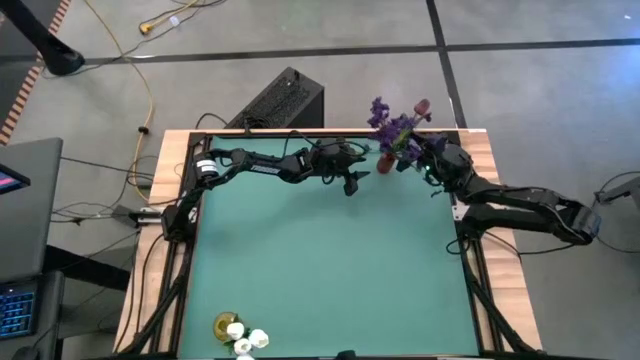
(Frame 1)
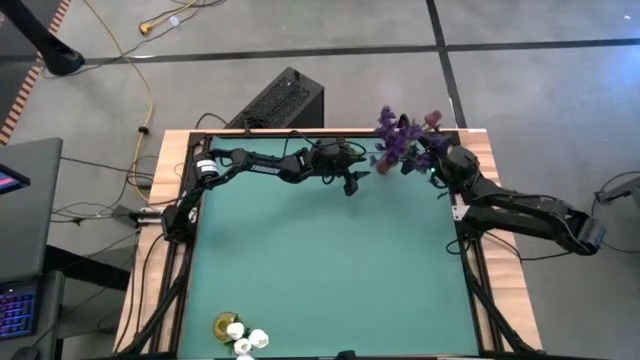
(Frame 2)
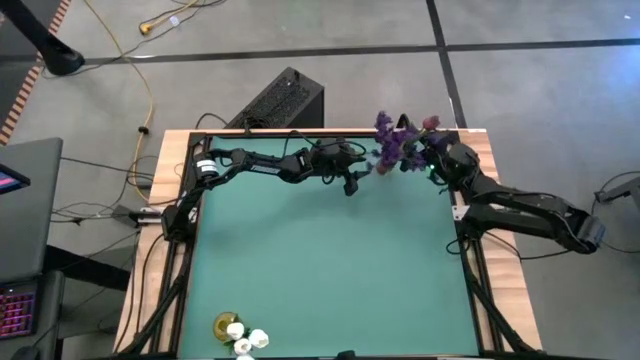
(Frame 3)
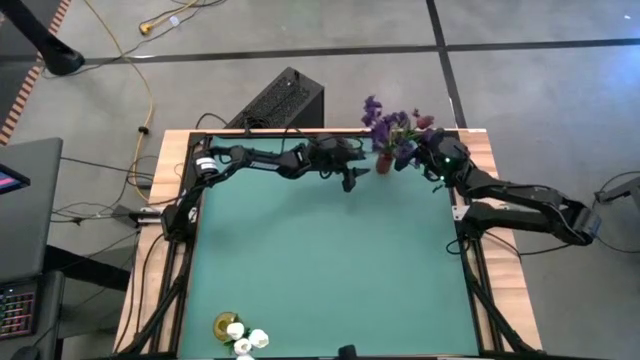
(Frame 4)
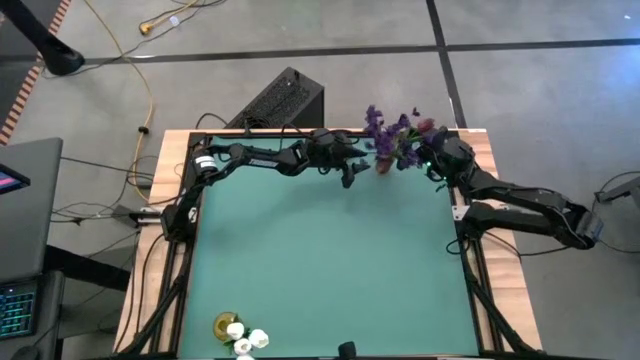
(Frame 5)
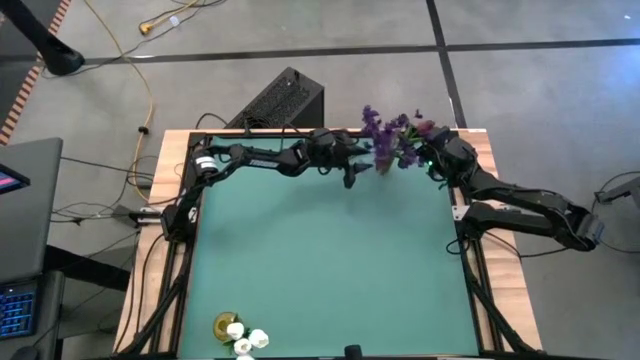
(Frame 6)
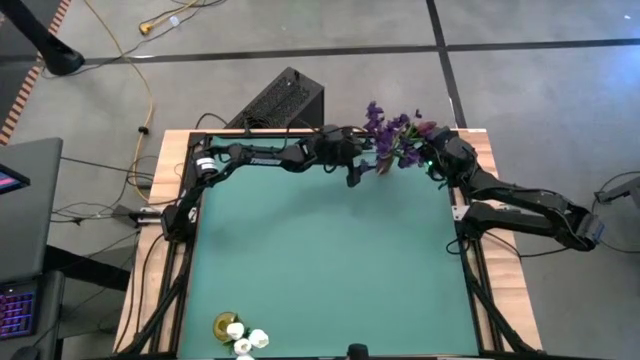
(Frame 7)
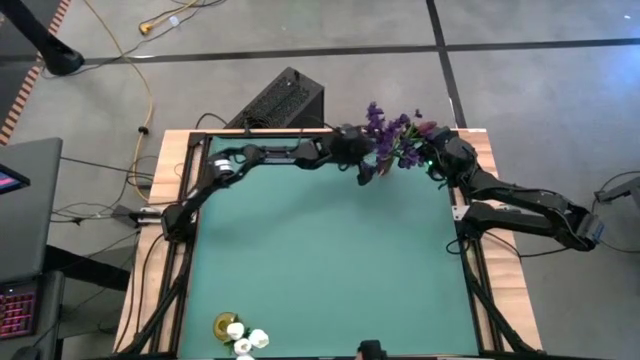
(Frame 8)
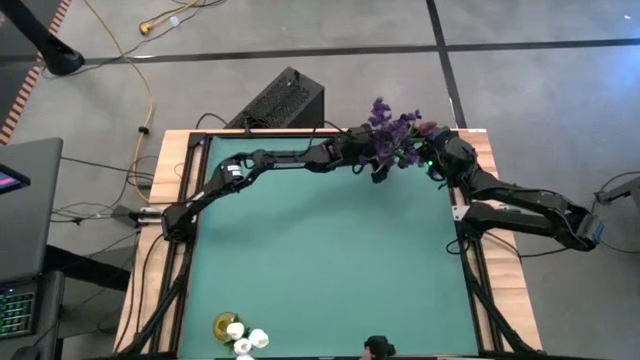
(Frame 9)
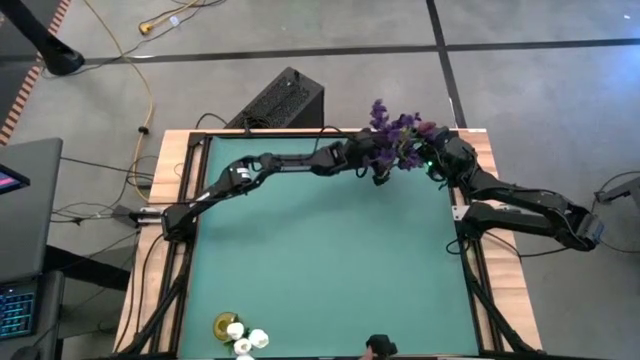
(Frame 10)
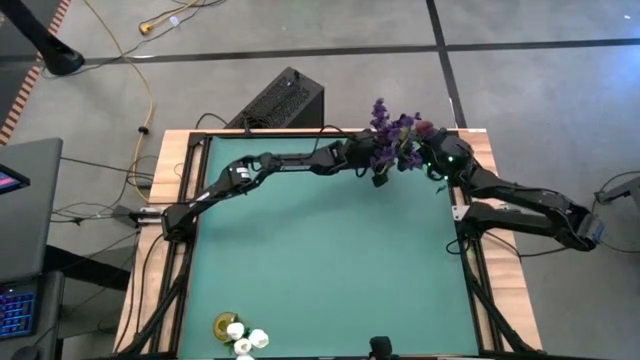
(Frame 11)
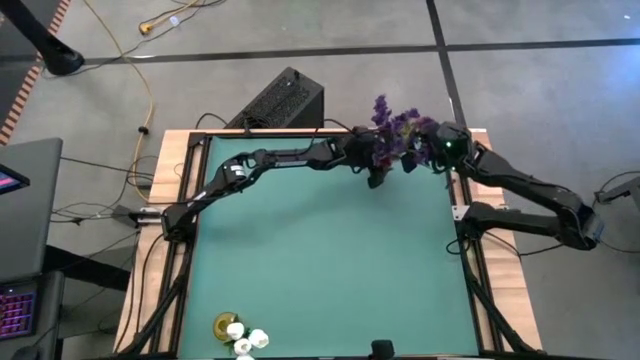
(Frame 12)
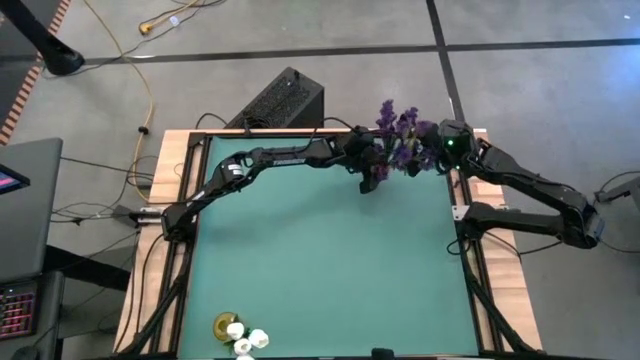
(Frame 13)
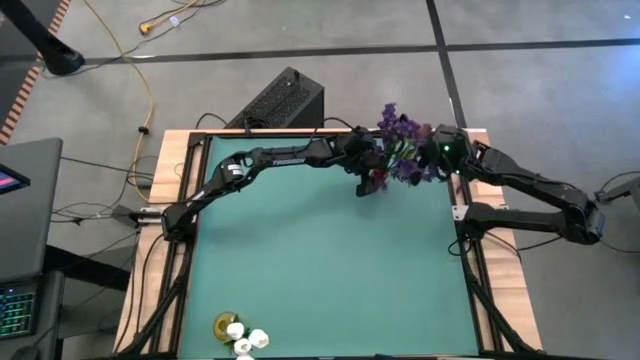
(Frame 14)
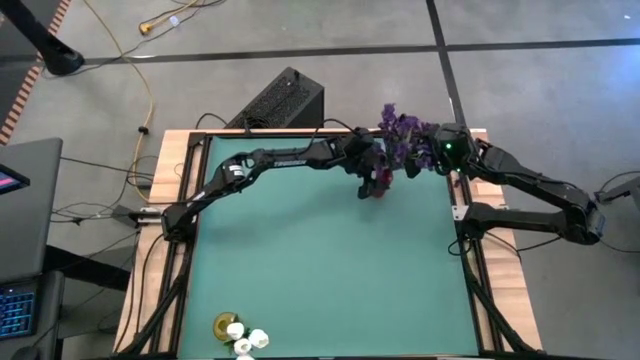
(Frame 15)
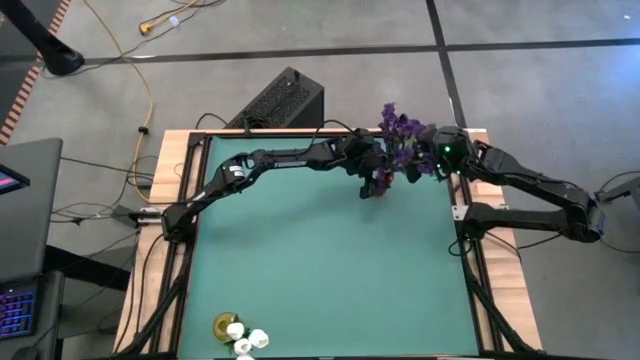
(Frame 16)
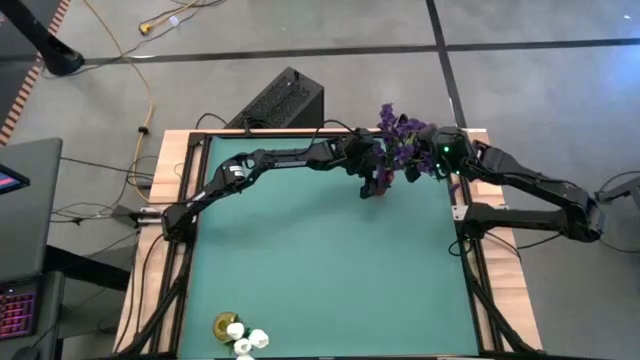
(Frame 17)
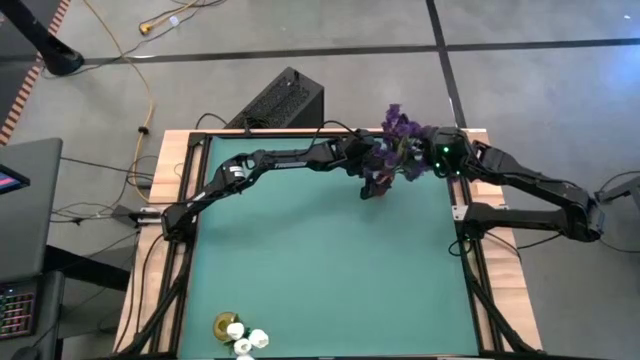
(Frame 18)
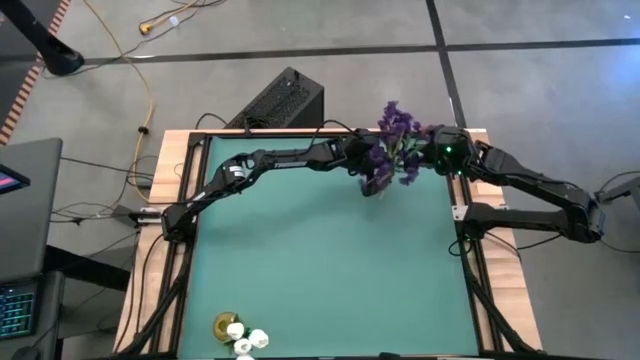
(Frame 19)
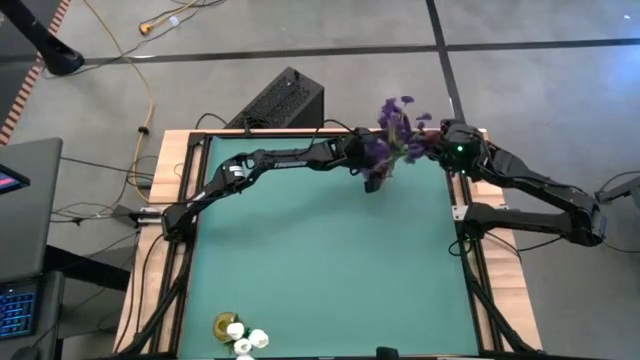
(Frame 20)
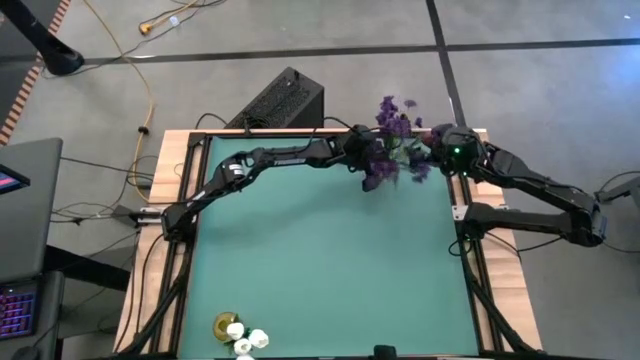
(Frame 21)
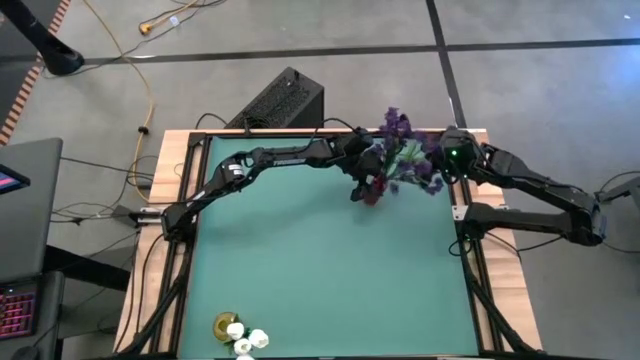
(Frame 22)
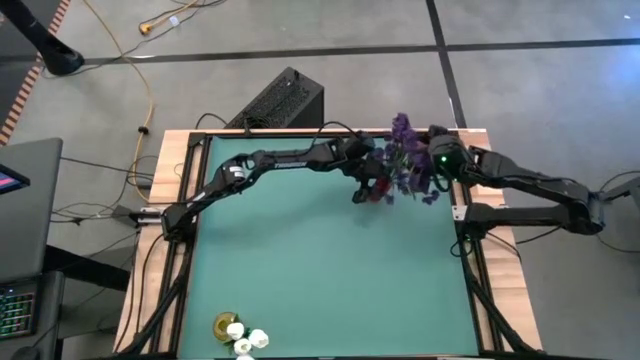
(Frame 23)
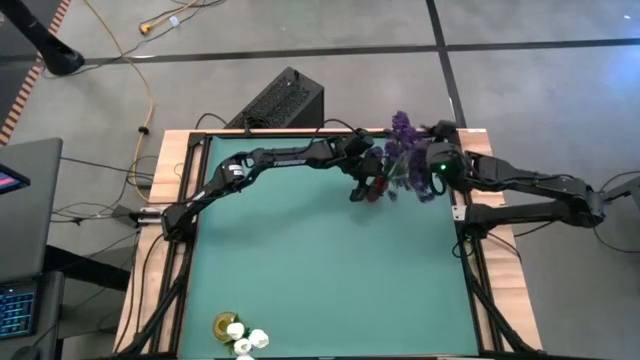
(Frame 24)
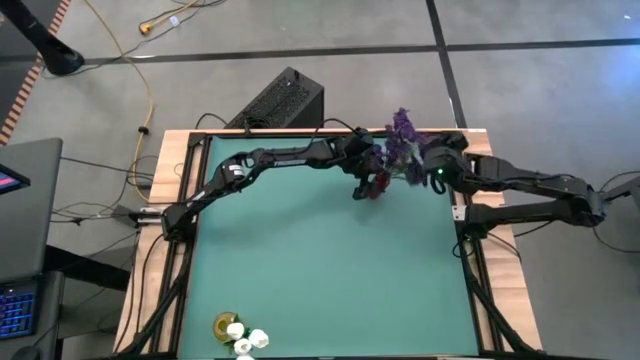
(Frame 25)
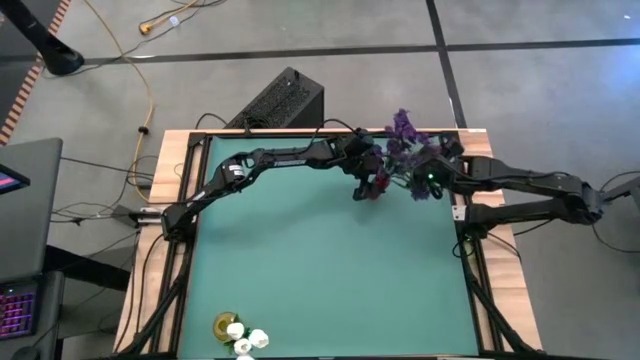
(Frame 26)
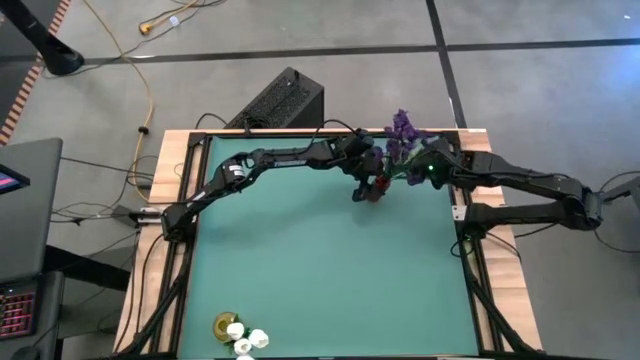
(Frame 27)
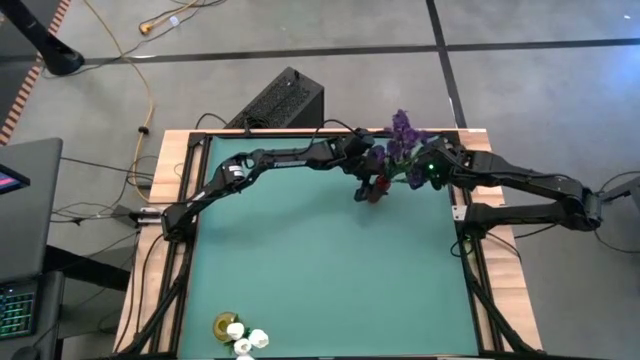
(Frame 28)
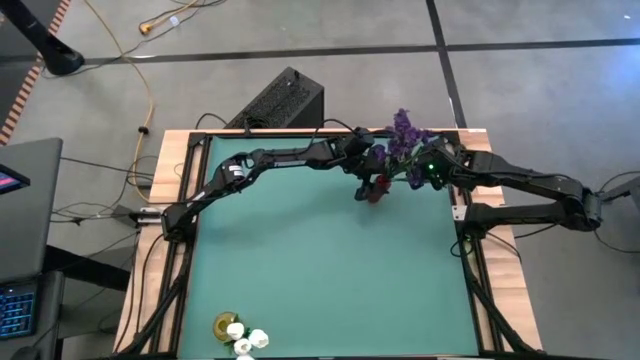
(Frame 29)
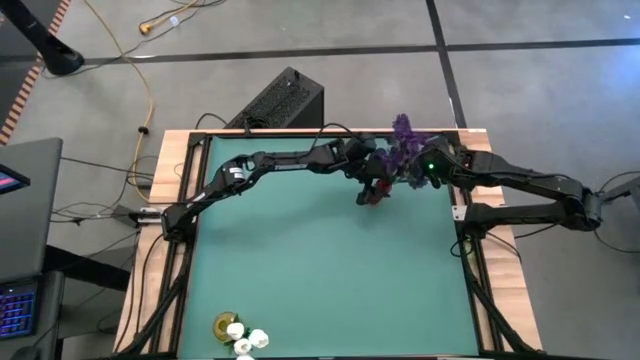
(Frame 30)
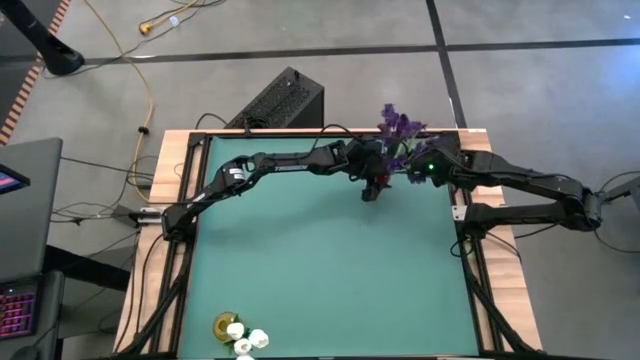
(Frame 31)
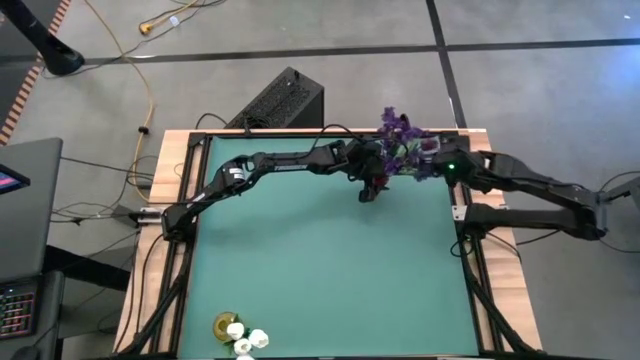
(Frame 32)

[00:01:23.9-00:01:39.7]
Task: Sort flowers into vase by color
Put the red flowers into the red vase

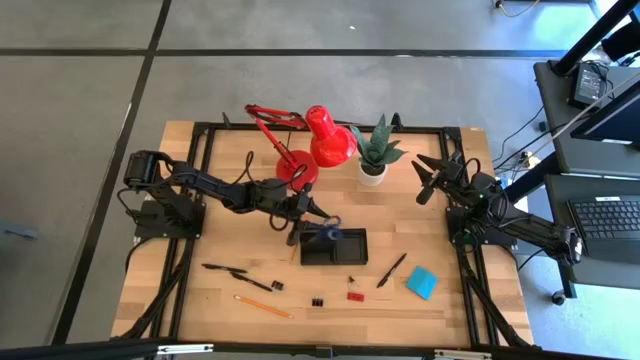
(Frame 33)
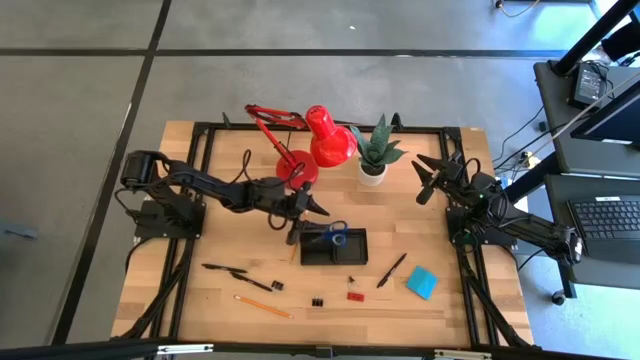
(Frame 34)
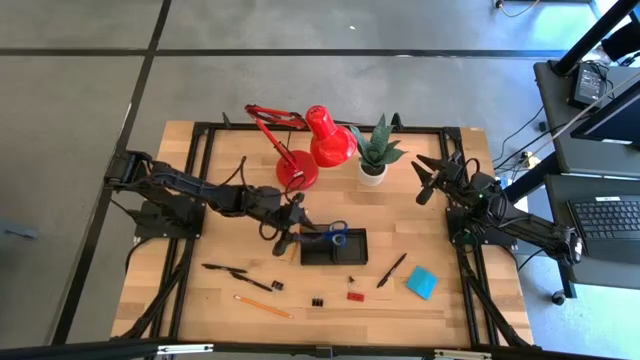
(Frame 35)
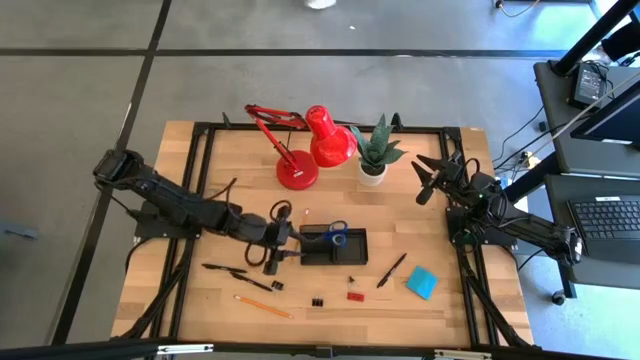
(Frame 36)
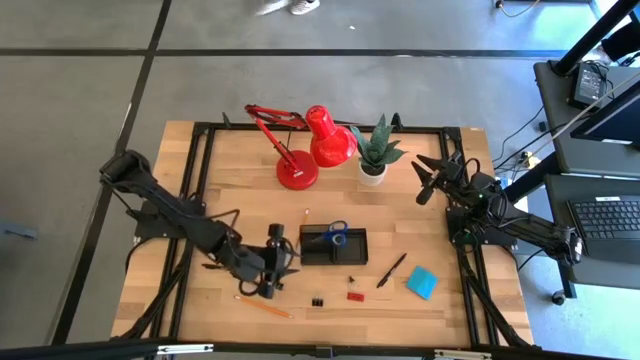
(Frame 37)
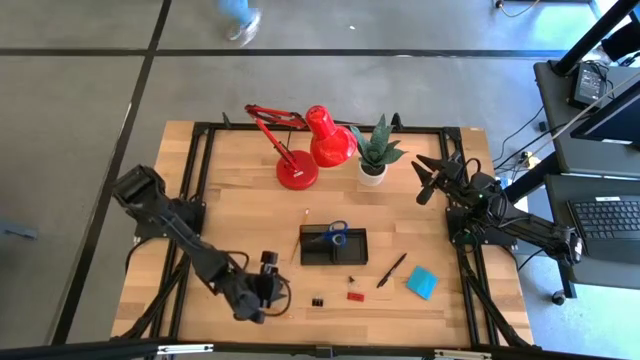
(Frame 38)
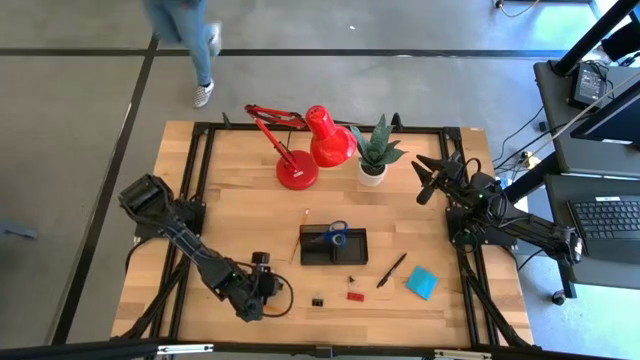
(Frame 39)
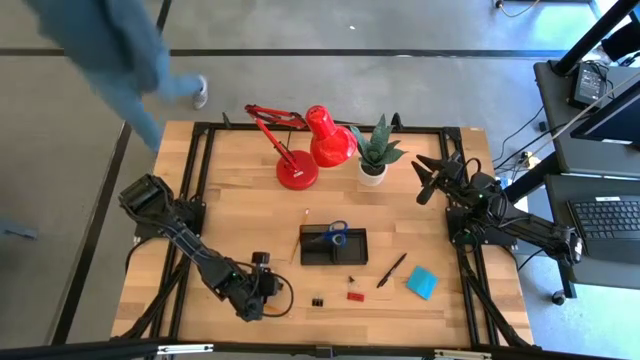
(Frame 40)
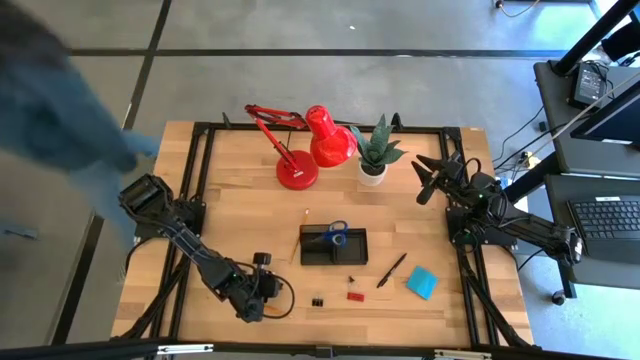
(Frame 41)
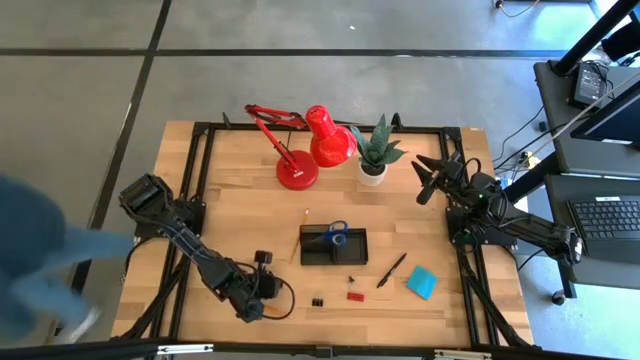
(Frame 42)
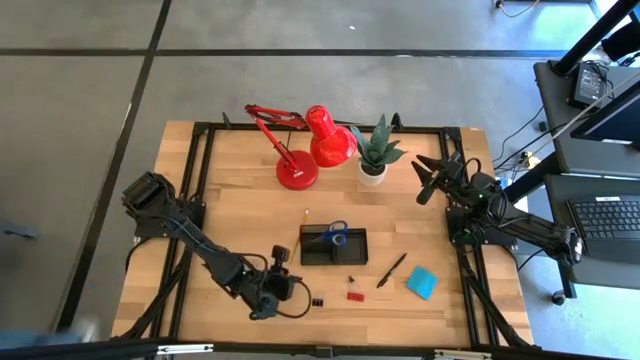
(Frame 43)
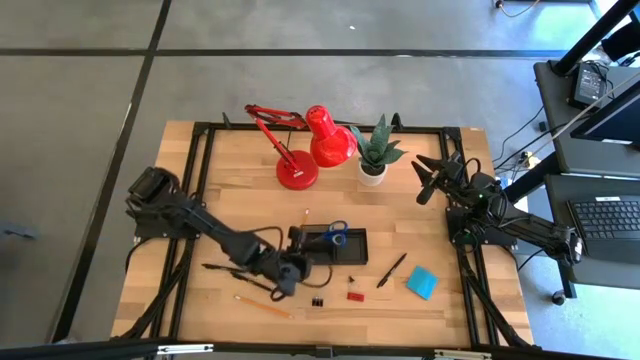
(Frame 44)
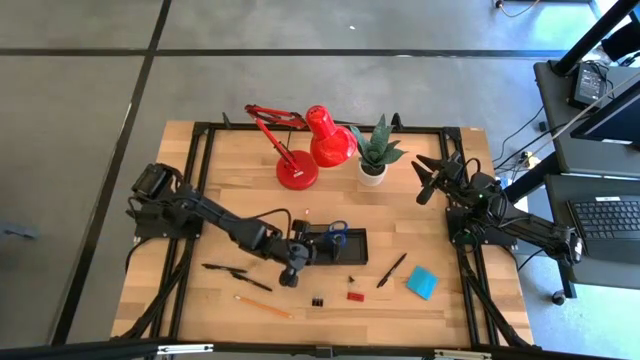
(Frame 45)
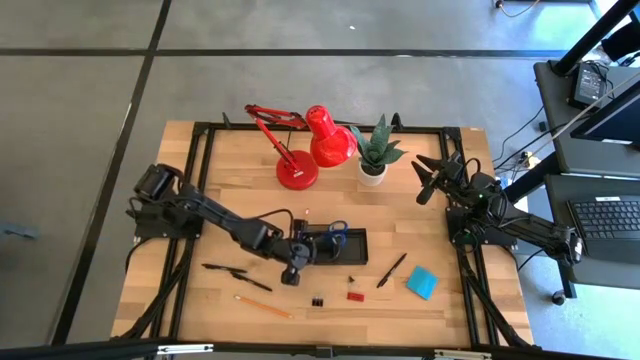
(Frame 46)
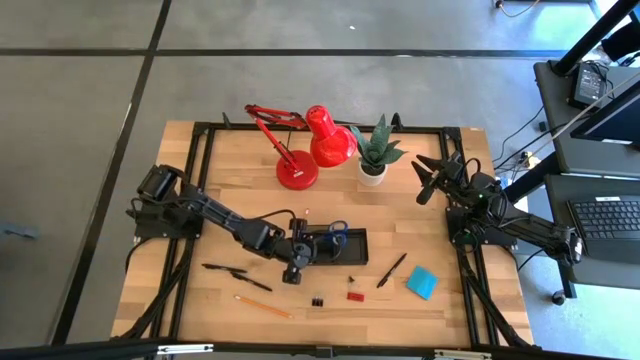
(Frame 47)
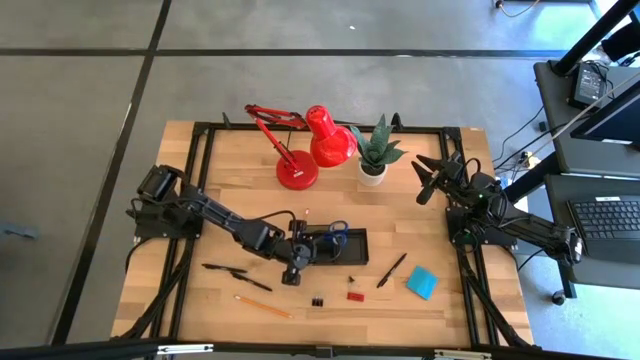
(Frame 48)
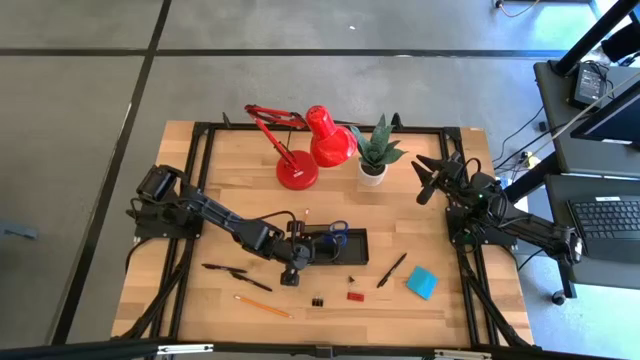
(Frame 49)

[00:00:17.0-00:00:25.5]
Task: Pick and place office supplies into organizer
Put the left binder clip into the black desk organizer
